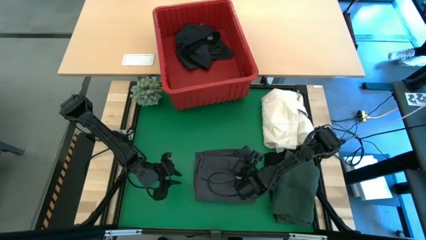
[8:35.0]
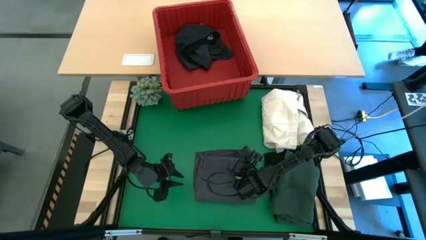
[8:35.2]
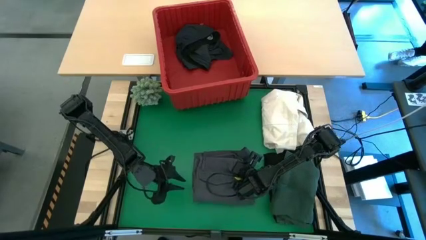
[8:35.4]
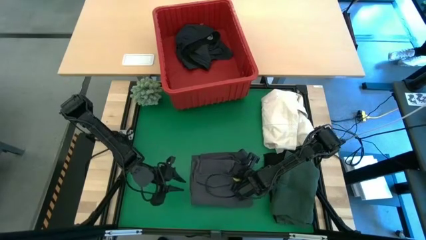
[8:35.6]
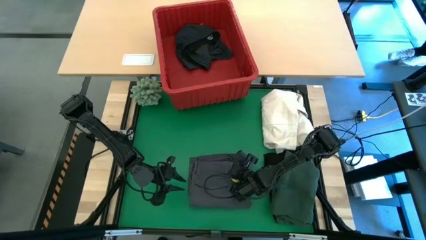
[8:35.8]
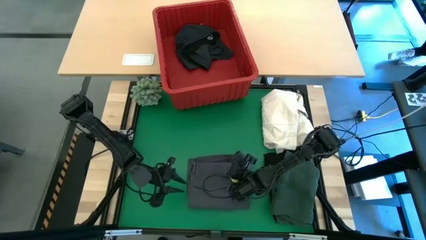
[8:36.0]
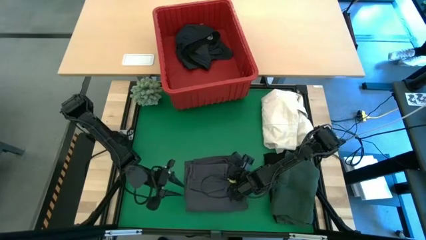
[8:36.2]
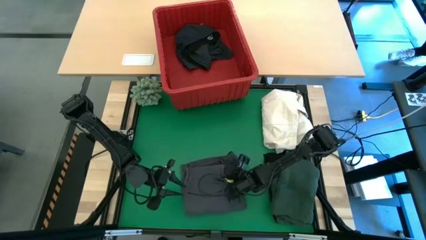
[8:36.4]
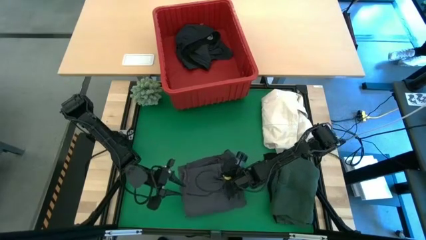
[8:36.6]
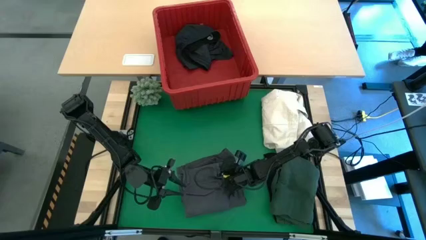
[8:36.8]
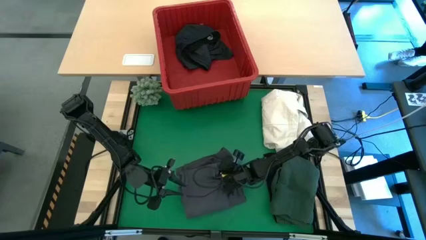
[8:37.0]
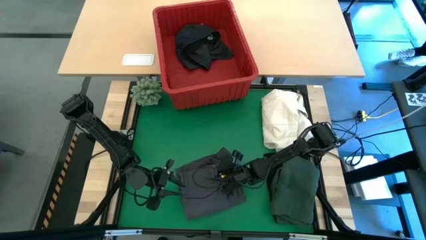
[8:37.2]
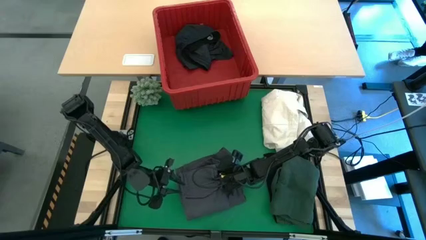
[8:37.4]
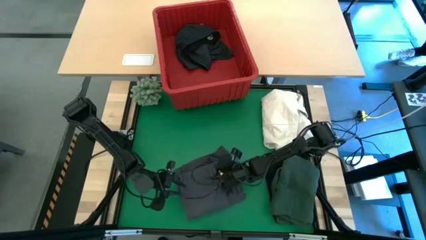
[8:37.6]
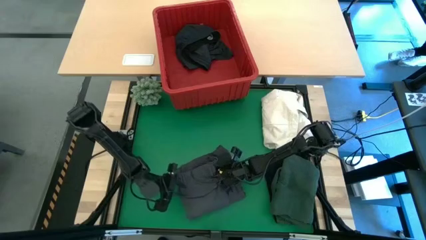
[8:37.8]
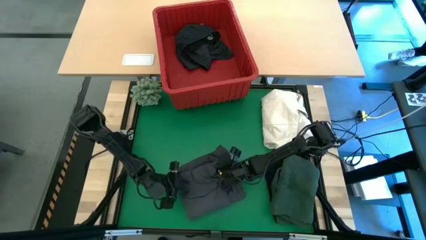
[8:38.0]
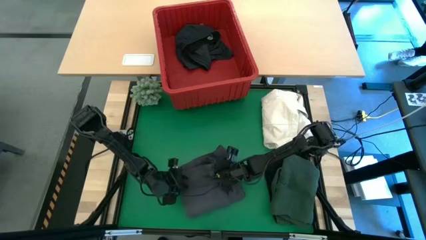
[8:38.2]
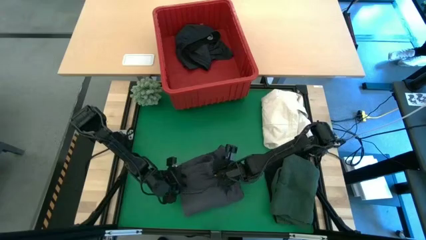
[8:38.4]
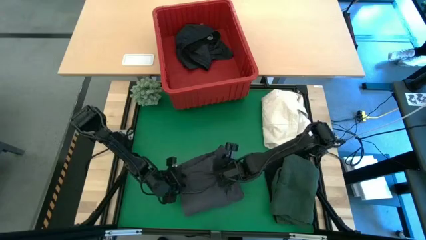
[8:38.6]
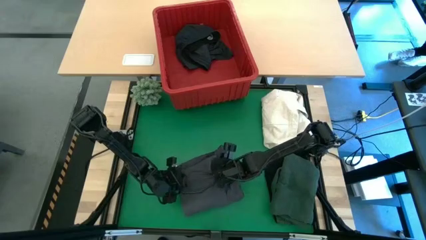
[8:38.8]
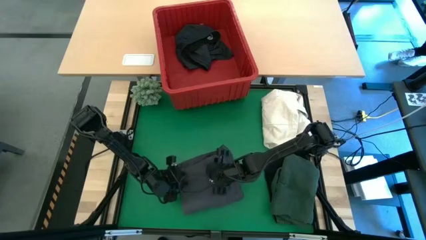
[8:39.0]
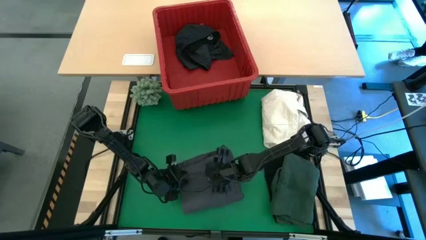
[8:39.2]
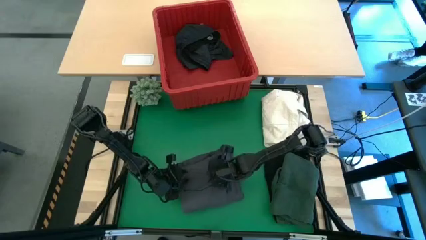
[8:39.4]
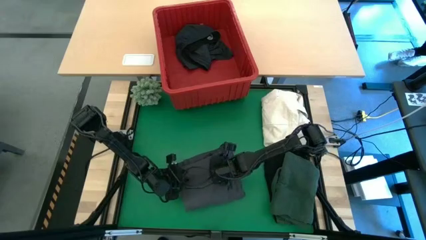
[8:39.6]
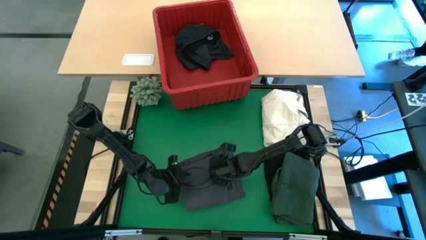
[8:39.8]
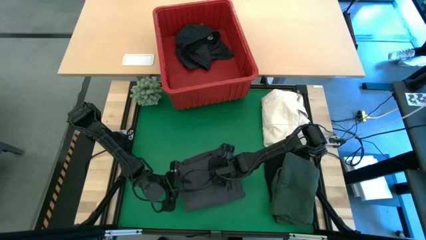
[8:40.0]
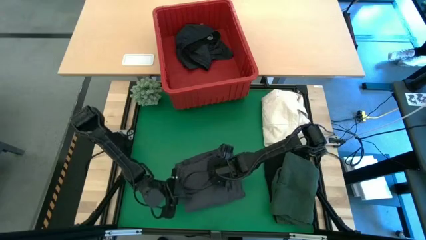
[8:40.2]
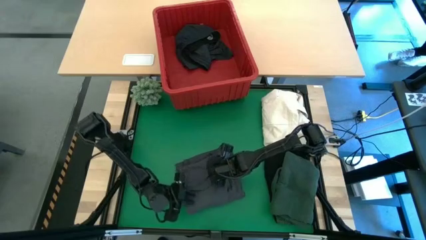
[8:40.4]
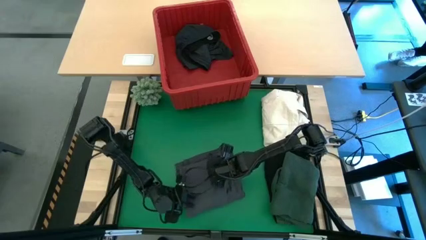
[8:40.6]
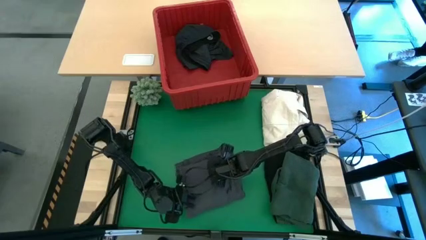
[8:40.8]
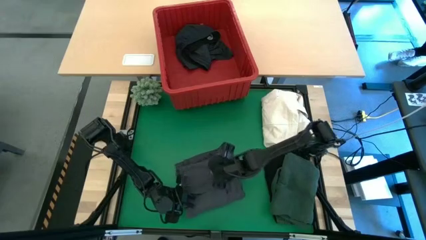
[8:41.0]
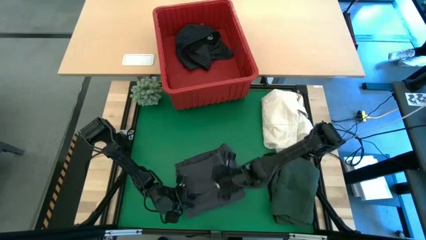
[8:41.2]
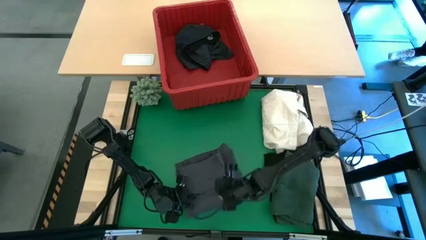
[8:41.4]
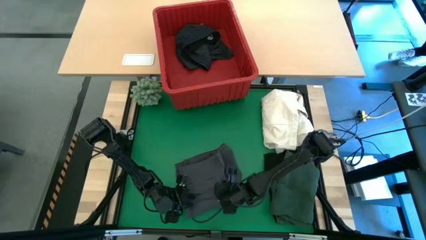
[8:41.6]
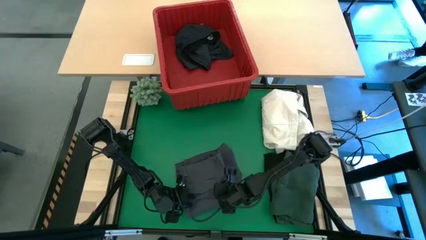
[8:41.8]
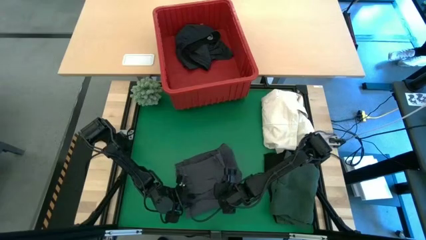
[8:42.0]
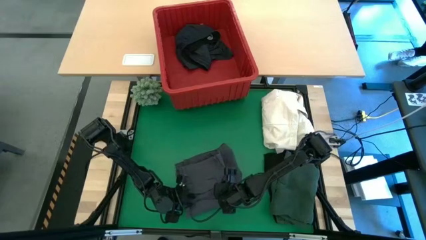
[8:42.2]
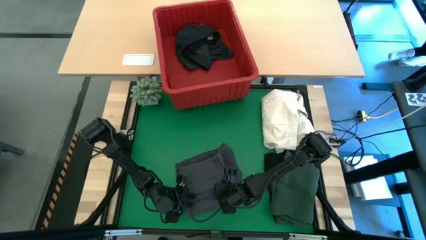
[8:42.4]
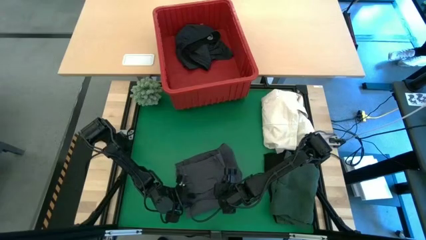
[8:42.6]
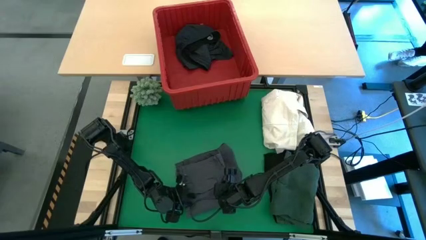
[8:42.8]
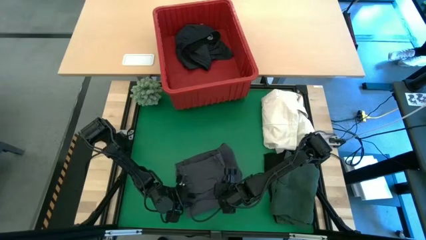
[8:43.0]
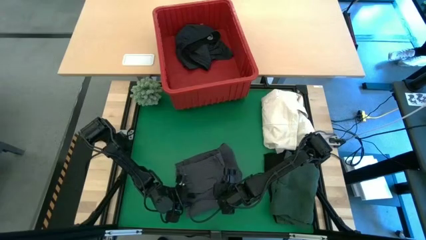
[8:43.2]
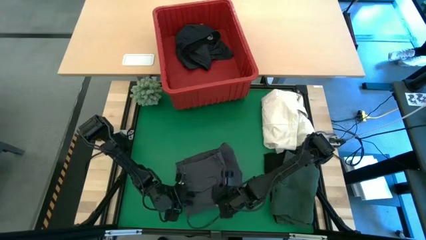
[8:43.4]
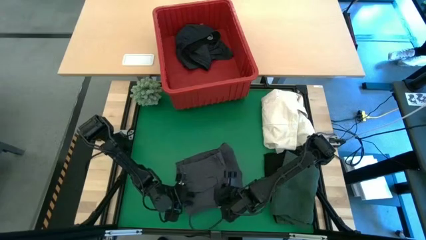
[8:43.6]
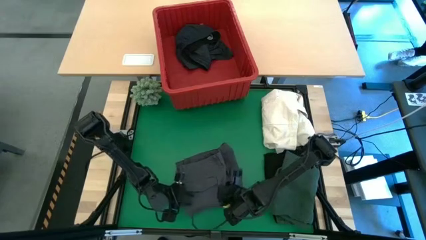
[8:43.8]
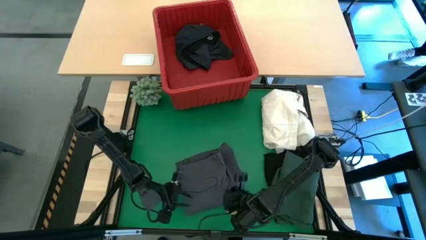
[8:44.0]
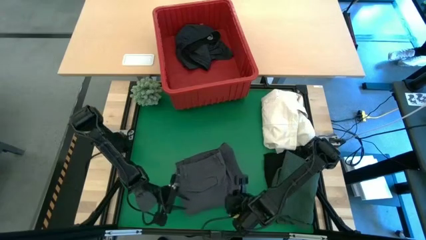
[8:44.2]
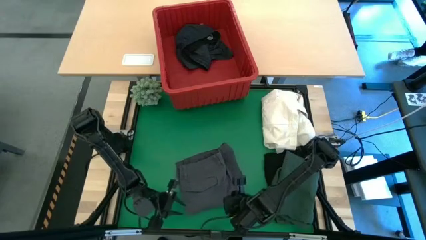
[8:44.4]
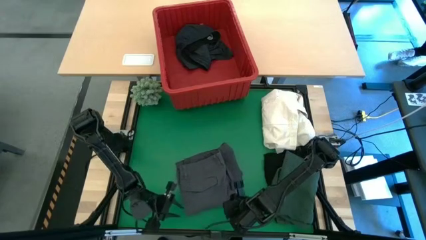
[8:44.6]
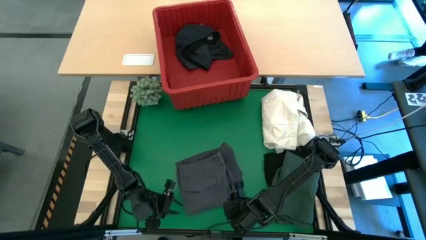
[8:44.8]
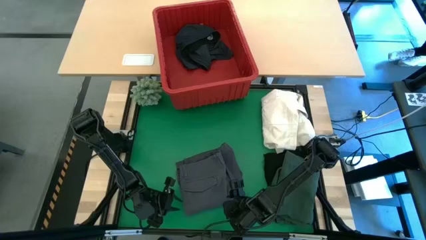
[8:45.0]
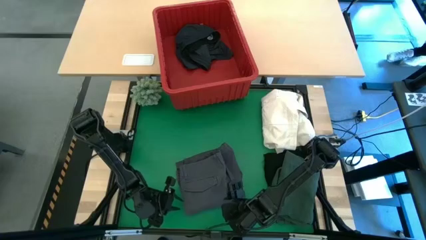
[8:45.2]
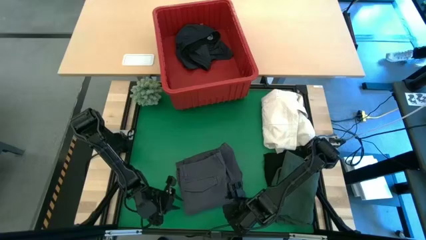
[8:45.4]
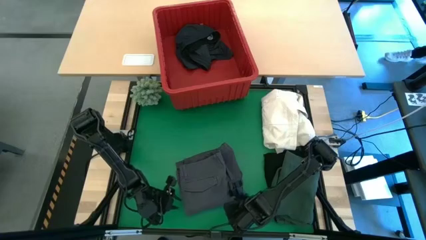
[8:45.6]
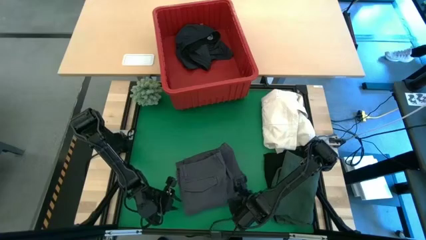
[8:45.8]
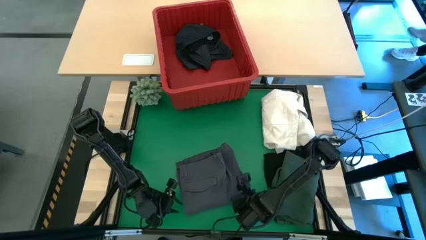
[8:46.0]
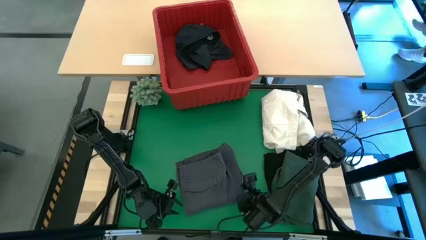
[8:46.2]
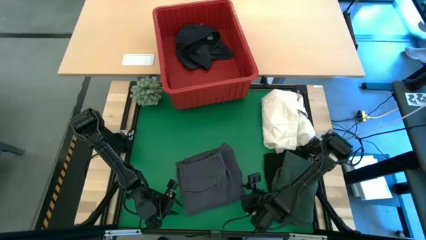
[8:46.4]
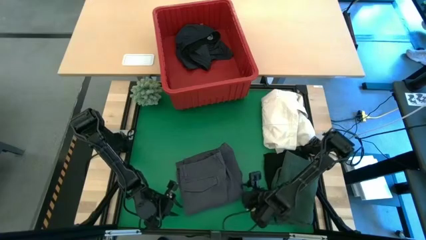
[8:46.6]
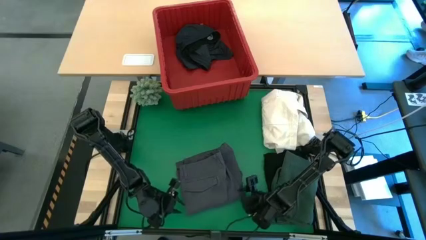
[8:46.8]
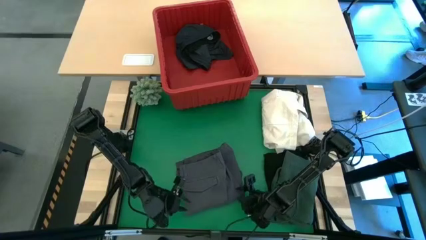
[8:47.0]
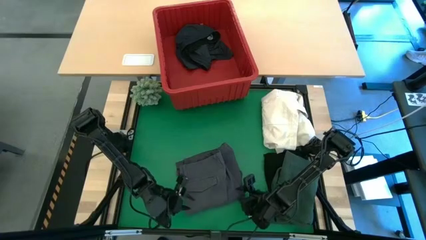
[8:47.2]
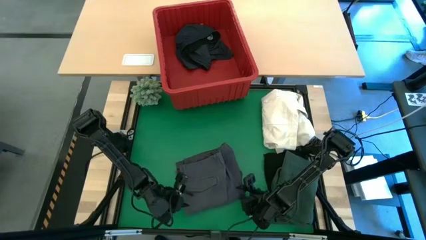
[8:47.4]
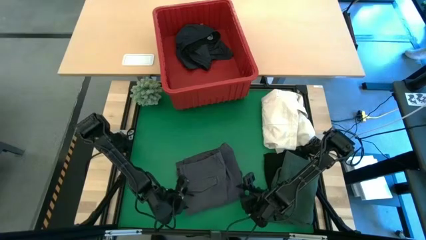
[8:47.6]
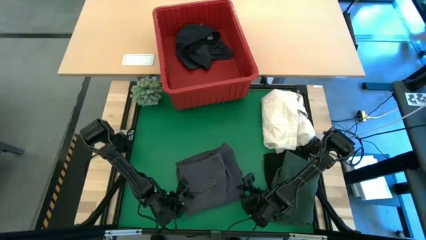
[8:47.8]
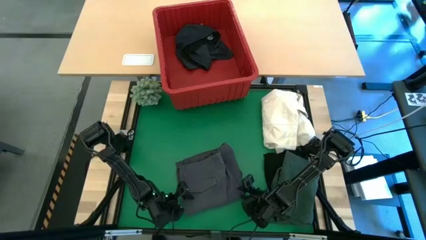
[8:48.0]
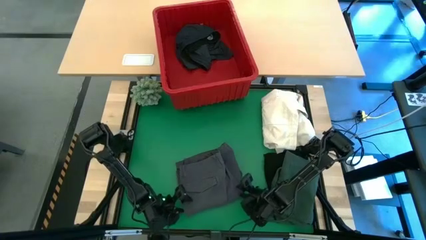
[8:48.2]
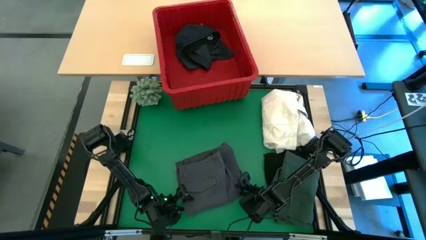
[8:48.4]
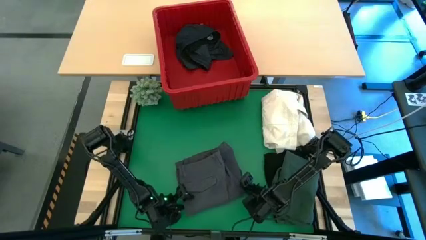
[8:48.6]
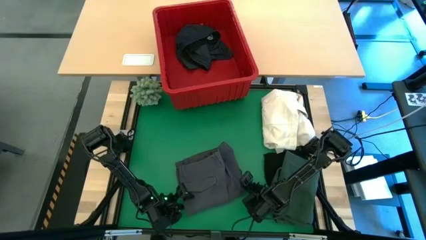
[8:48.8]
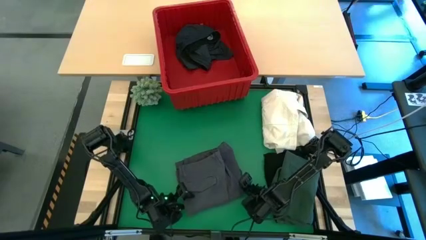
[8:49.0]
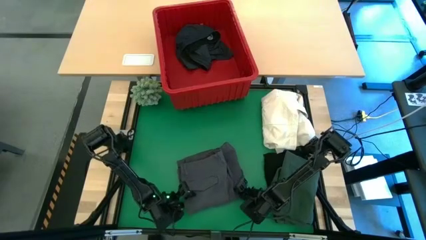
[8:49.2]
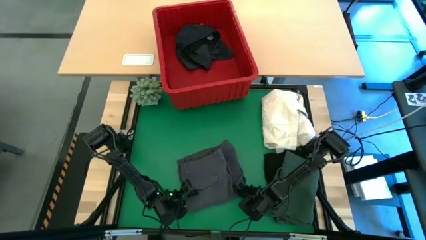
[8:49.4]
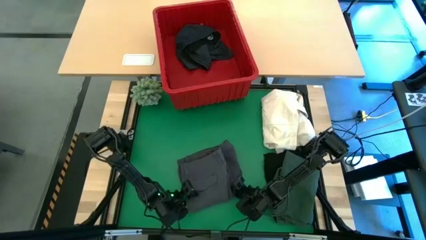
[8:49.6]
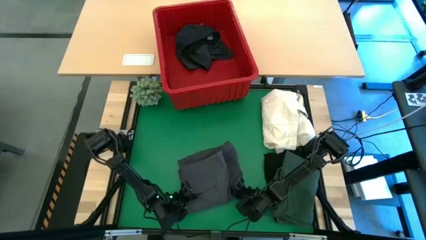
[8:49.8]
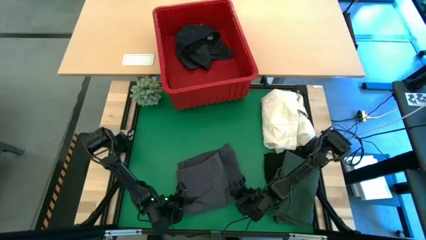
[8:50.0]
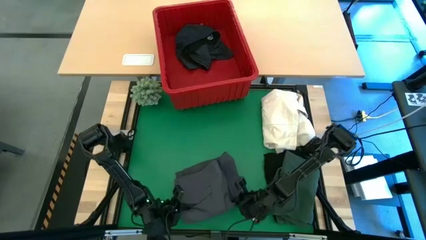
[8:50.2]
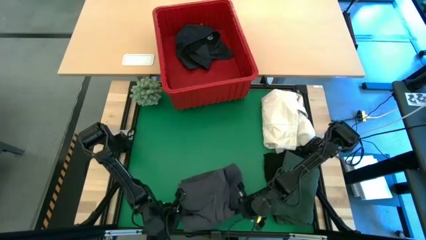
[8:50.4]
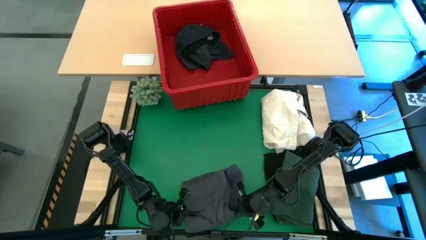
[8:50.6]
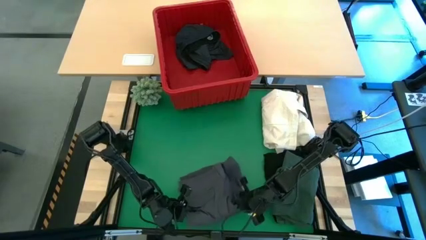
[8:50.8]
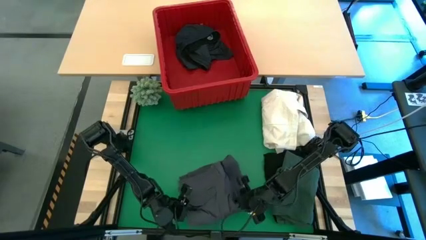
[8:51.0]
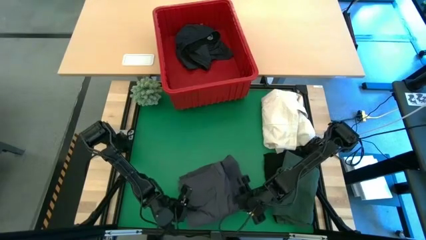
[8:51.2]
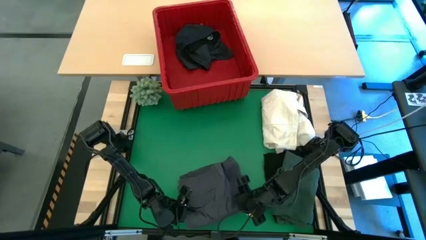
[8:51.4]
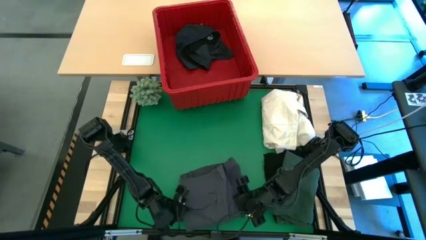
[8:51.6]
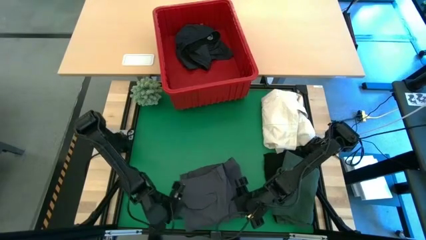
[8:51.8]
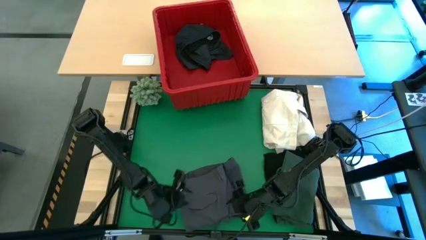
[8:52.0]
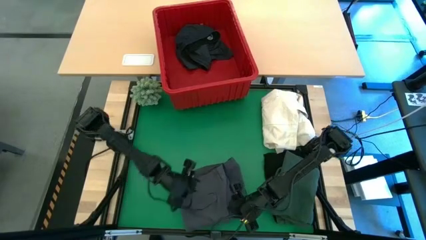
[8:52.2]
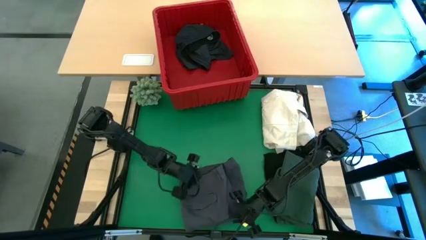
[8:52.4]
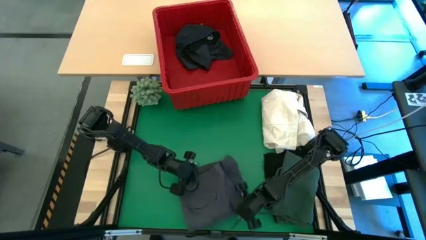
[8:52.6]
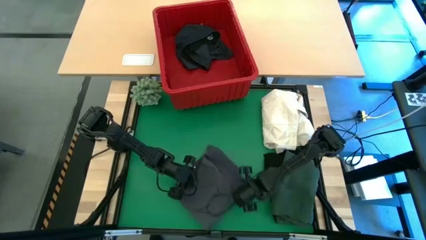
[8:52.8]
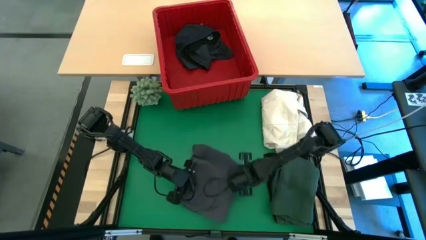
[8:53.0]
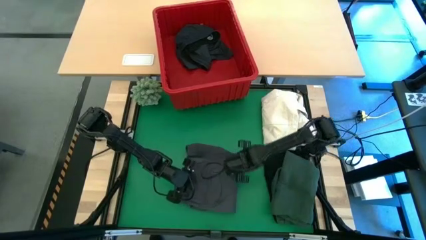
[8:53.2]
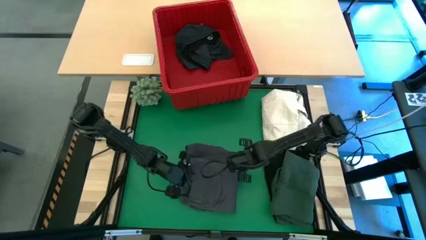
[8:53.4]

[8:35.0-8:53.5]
Task: Fold laundry
Fold the gray pants
